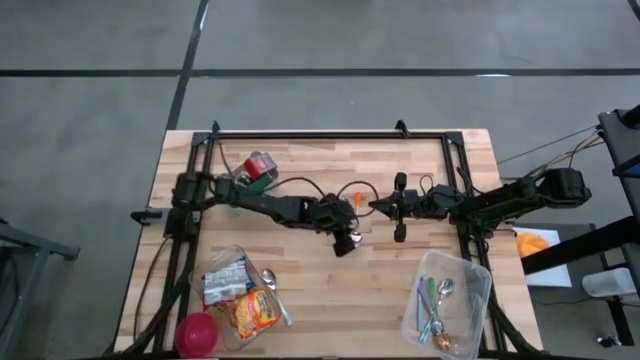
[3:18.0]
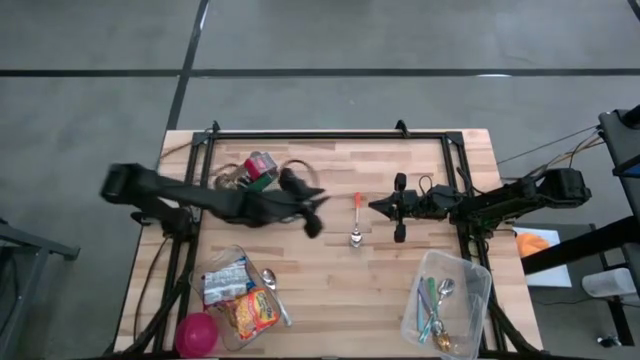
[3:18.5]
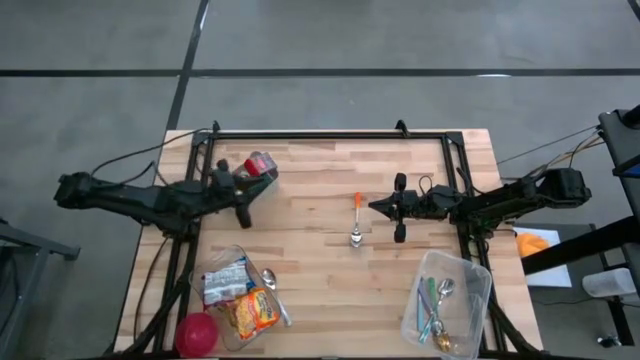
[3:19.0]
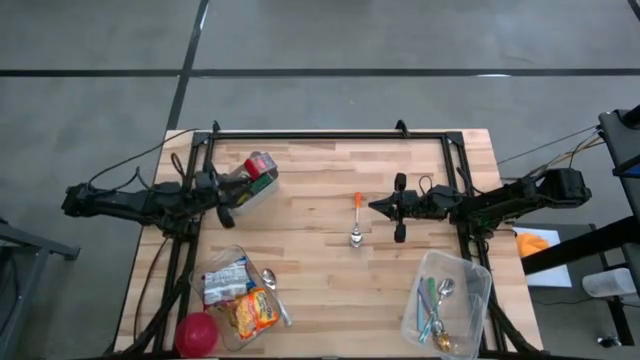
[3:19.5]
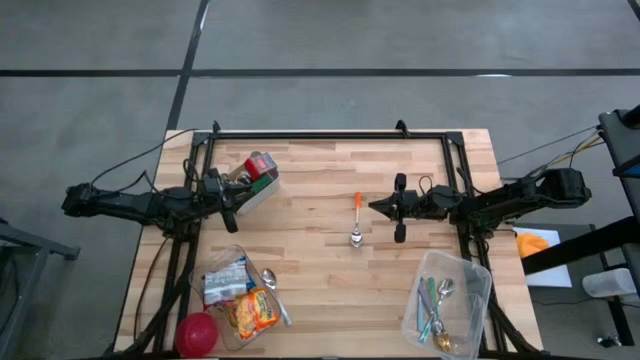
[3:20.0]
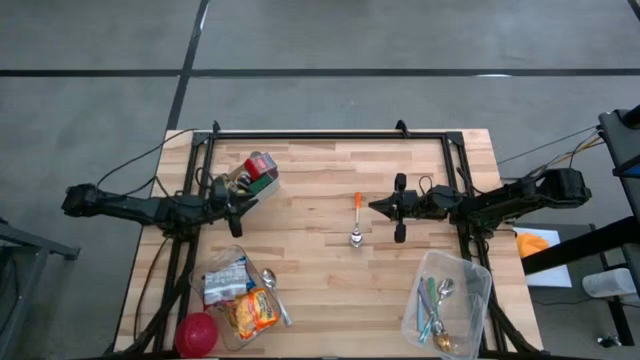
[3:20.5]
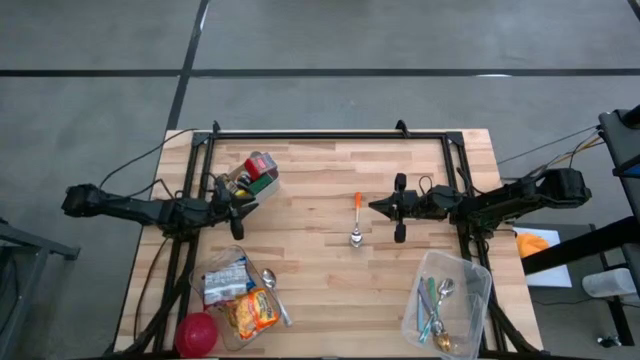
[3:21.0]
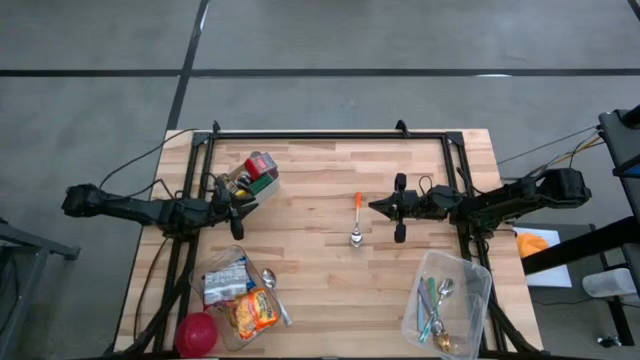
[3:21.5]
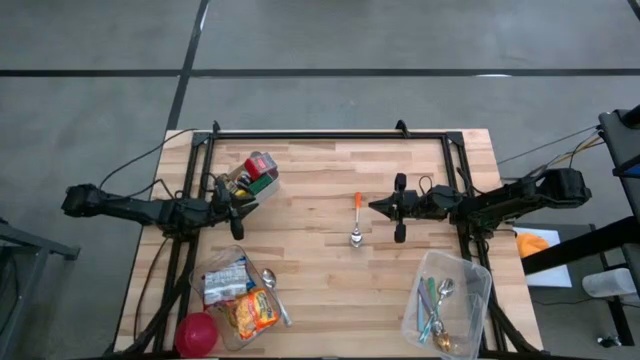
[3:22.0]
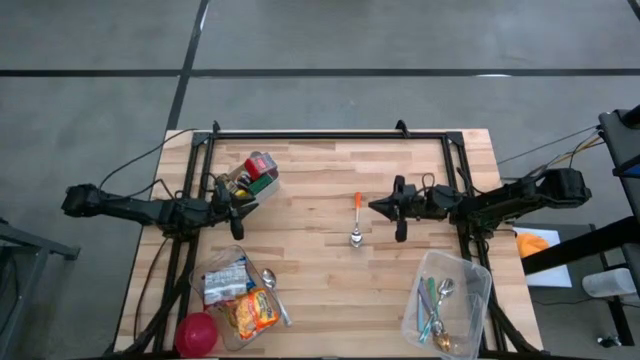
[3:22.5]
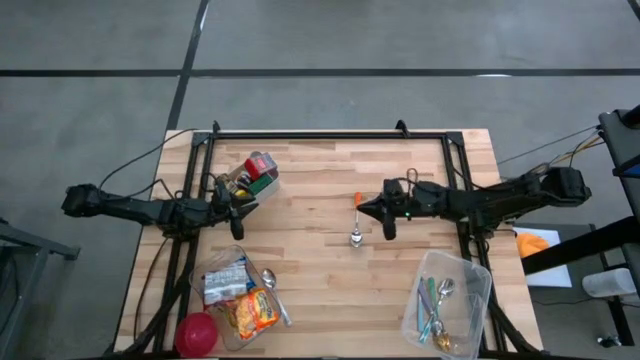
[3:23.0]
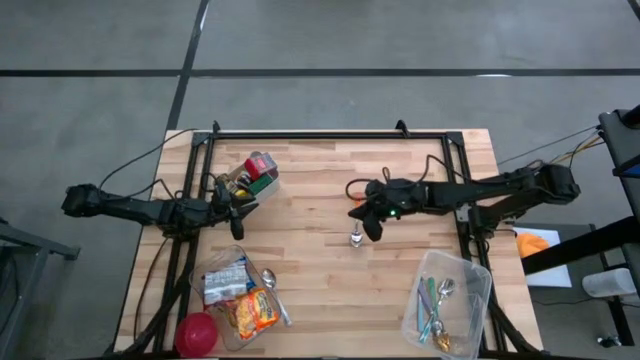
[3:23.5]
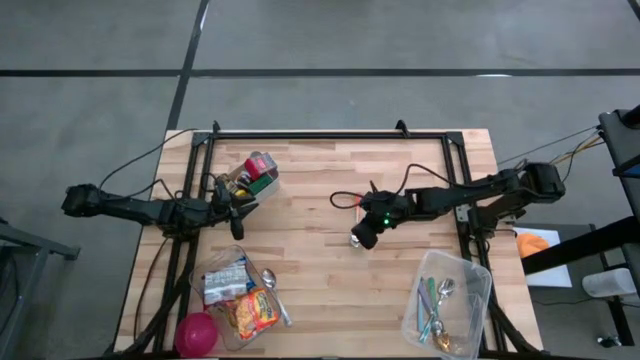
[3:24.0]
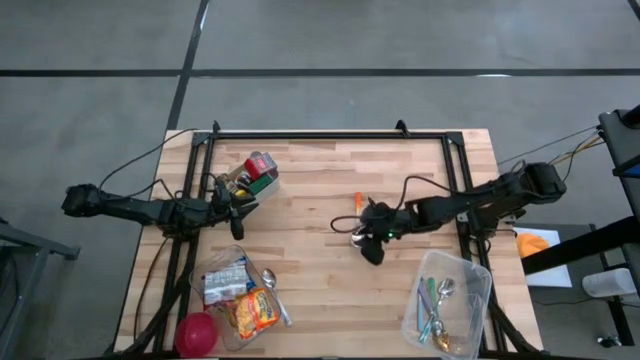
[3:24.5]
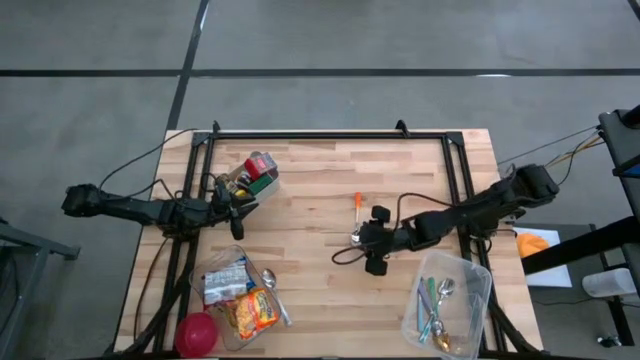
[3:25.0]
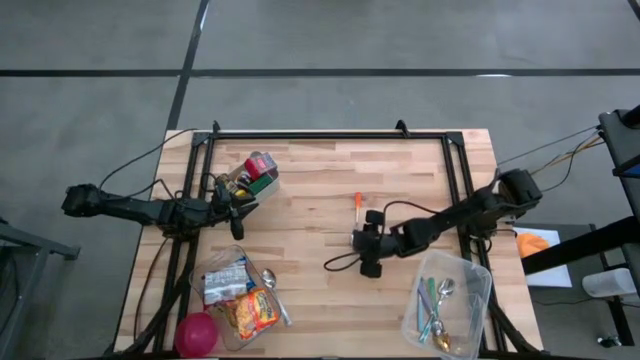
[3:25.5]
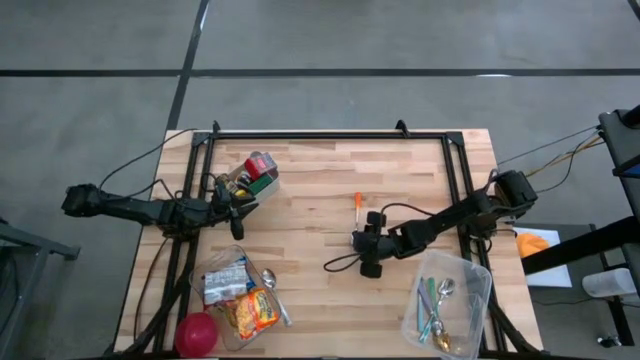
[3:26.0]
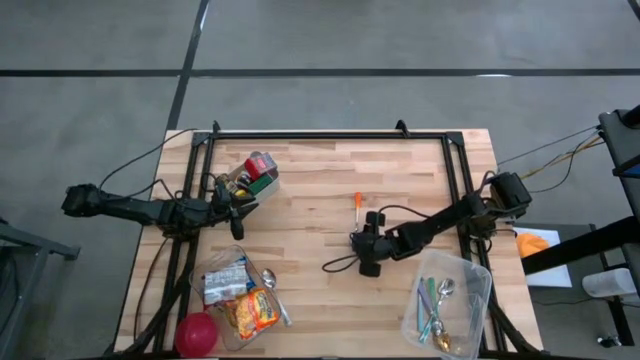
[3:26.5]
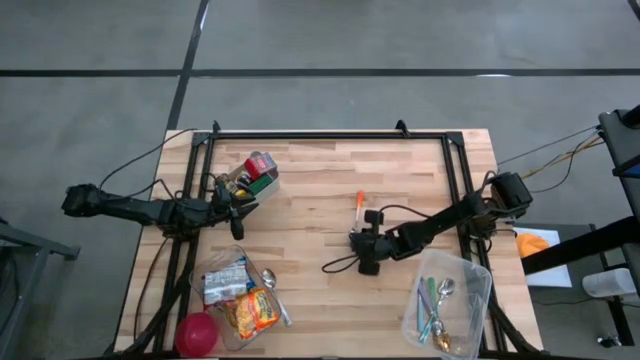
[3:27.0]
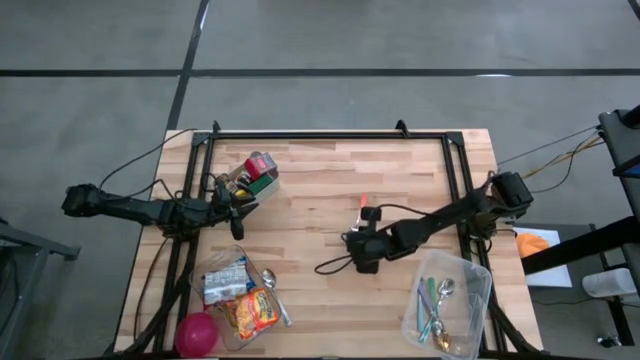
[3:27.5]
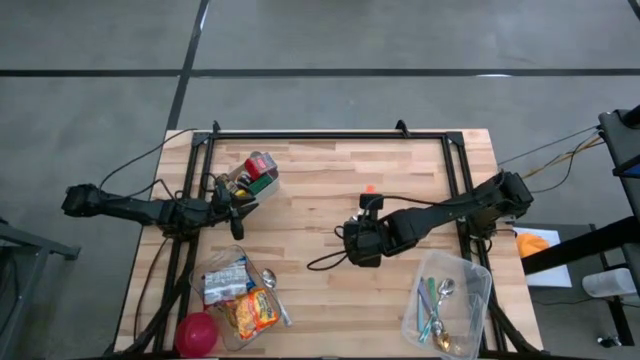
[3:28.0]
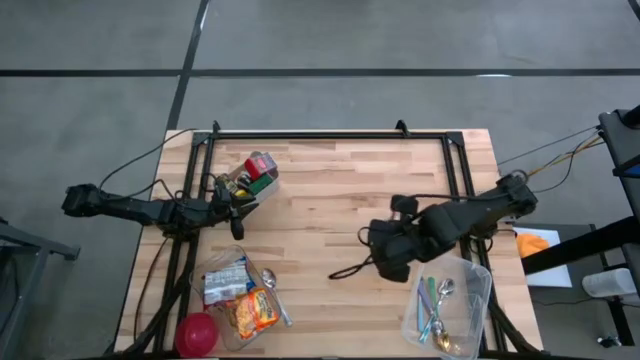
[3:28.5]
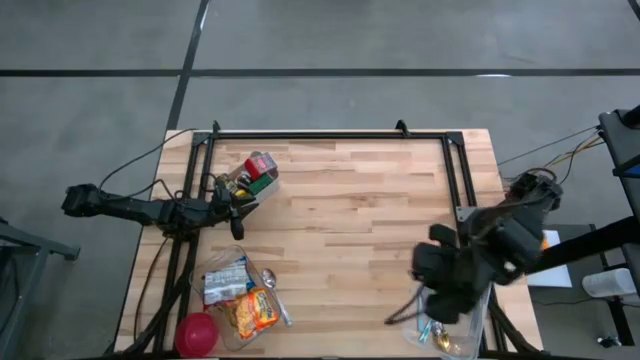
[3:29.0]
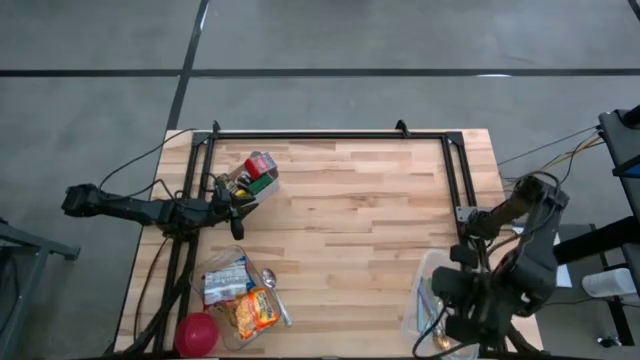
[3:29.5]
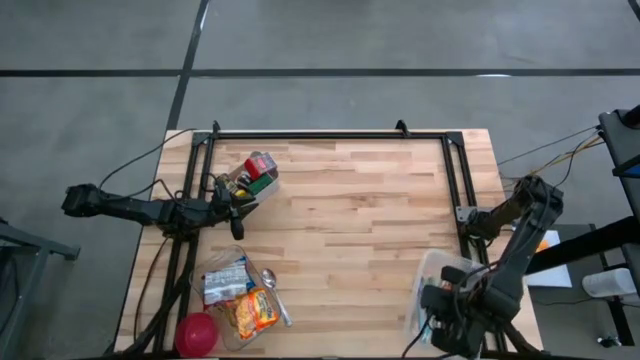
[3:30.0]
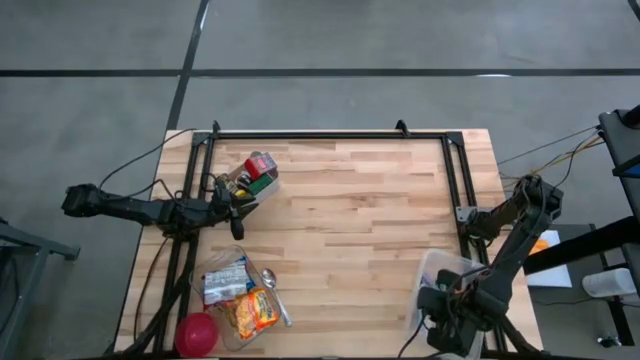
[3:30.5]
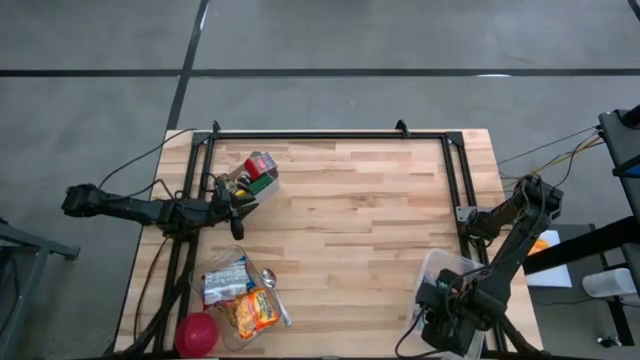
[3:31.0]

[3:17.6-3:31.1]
Put the orange spoon into the white bin
